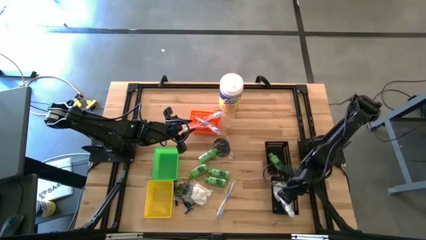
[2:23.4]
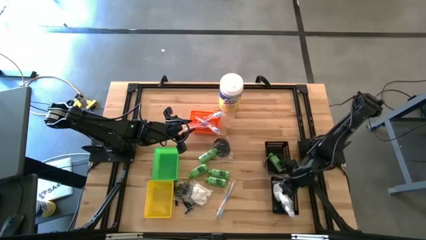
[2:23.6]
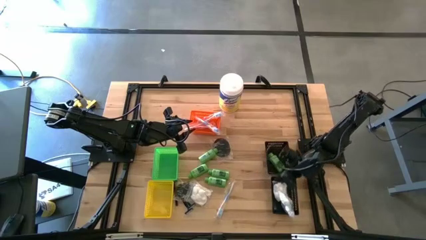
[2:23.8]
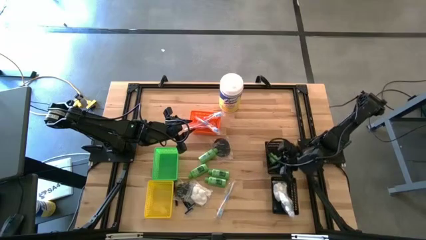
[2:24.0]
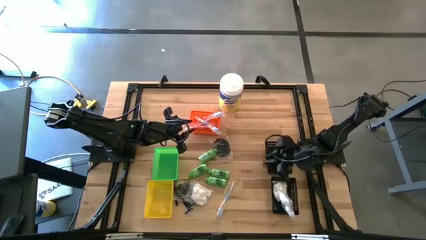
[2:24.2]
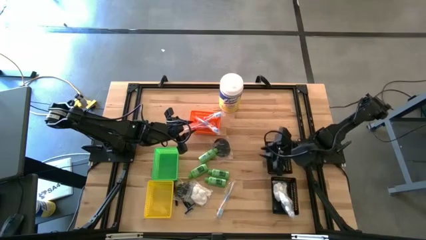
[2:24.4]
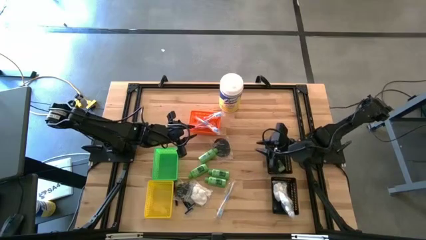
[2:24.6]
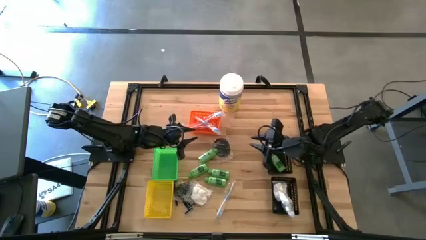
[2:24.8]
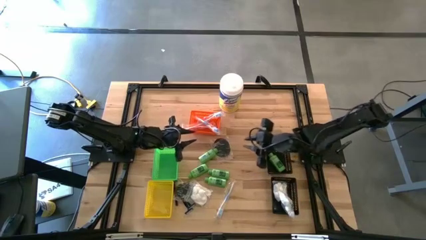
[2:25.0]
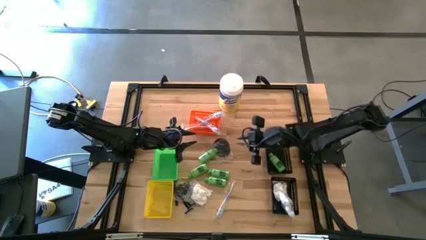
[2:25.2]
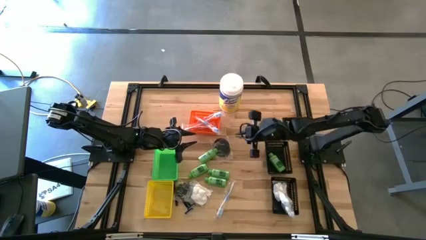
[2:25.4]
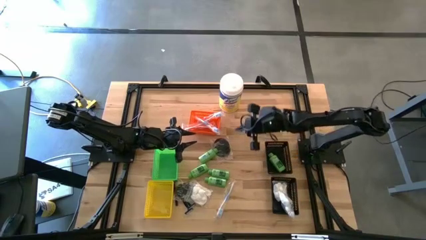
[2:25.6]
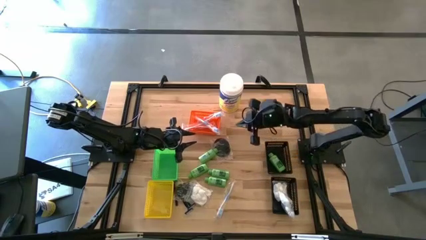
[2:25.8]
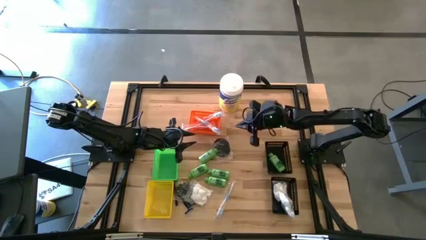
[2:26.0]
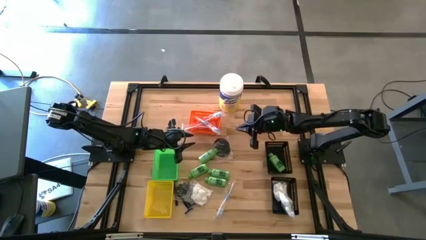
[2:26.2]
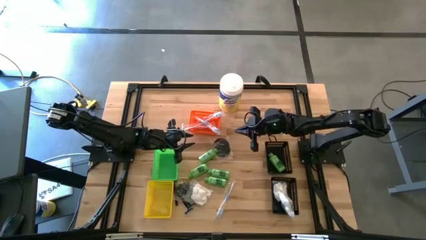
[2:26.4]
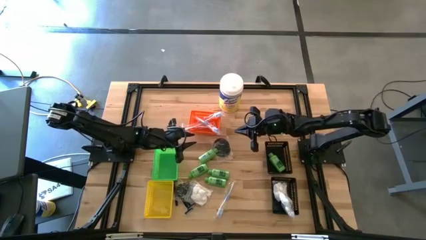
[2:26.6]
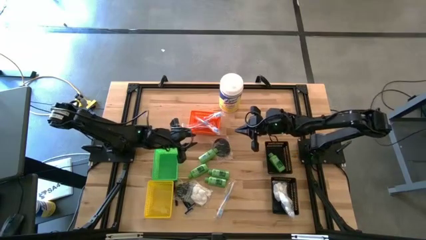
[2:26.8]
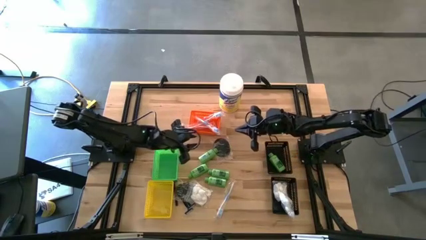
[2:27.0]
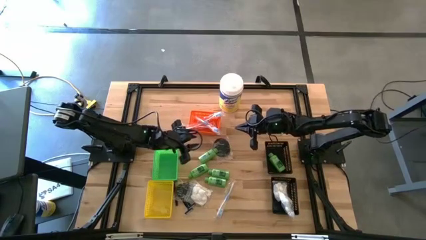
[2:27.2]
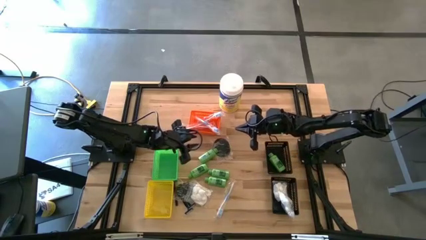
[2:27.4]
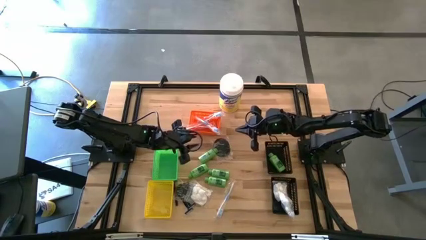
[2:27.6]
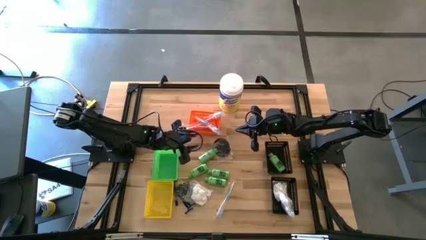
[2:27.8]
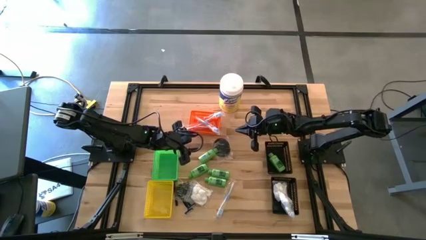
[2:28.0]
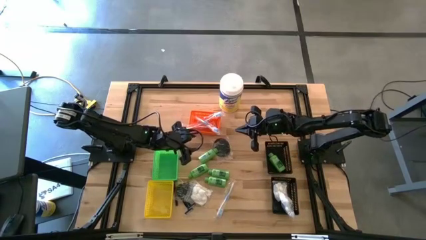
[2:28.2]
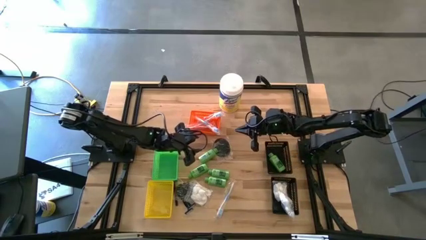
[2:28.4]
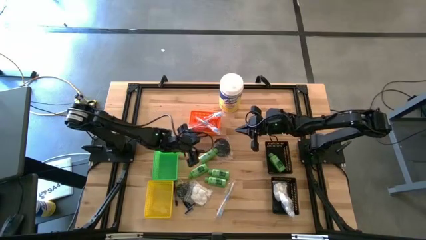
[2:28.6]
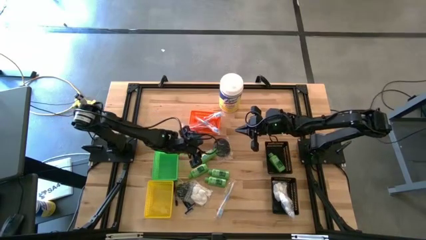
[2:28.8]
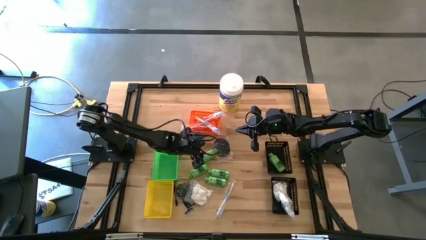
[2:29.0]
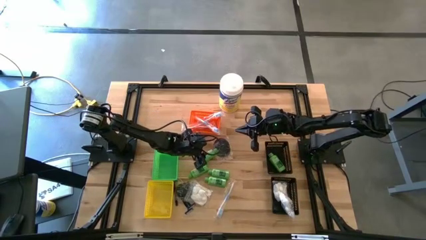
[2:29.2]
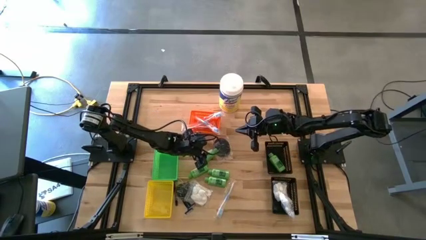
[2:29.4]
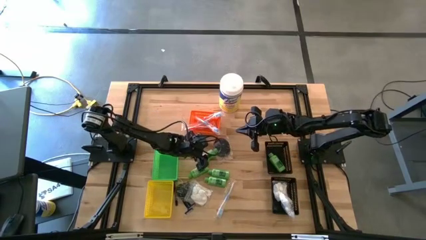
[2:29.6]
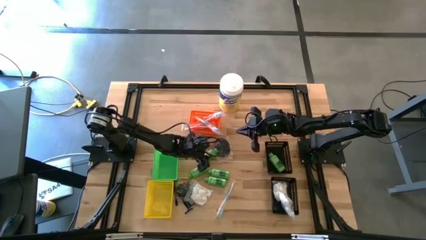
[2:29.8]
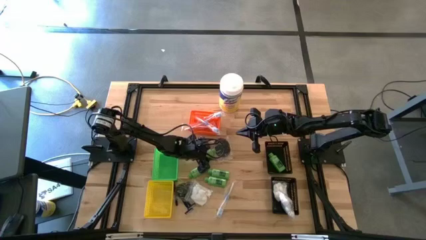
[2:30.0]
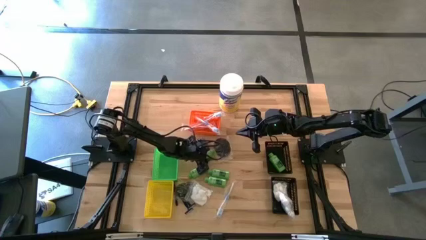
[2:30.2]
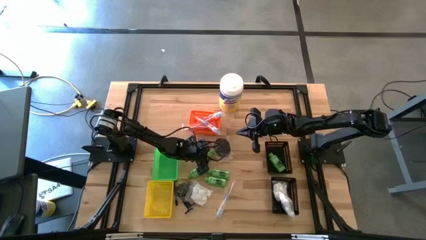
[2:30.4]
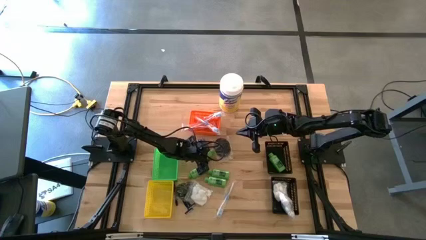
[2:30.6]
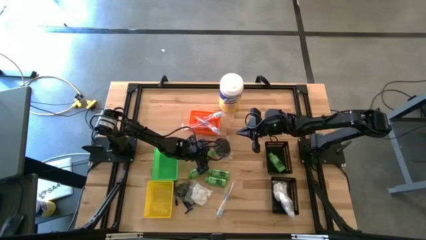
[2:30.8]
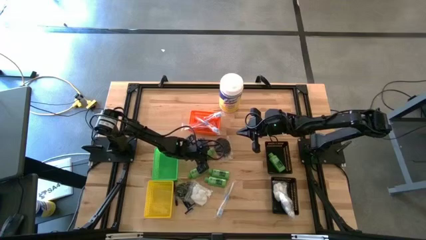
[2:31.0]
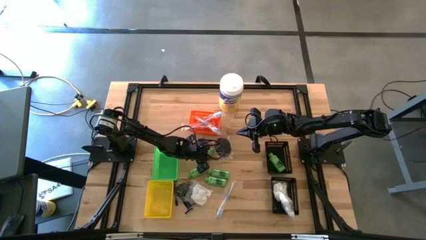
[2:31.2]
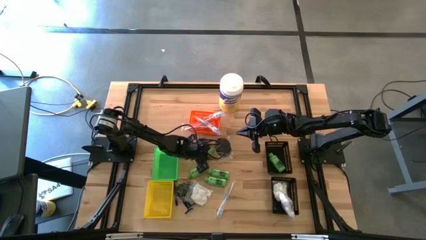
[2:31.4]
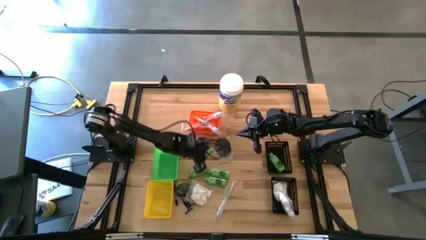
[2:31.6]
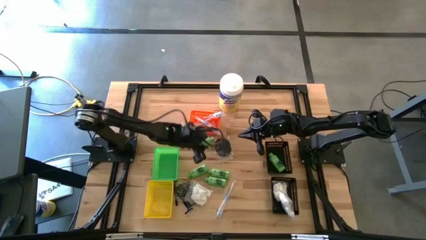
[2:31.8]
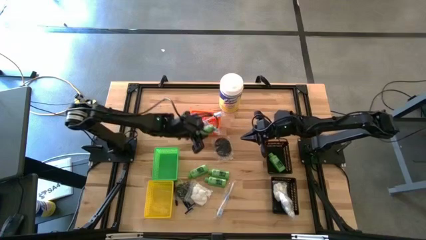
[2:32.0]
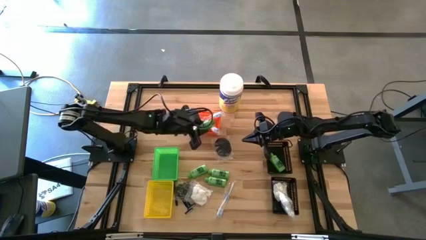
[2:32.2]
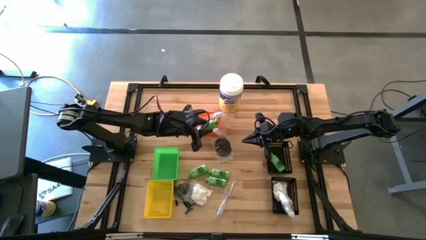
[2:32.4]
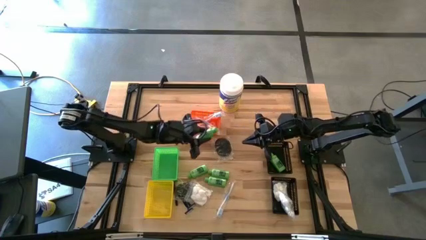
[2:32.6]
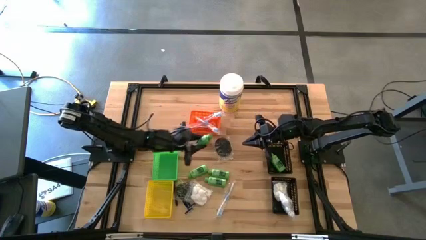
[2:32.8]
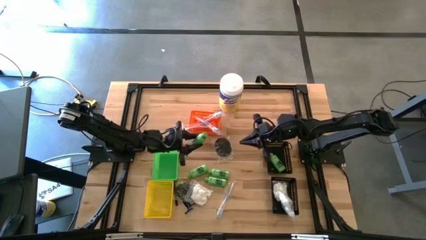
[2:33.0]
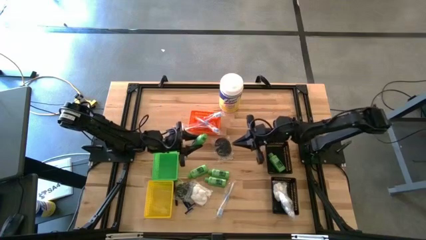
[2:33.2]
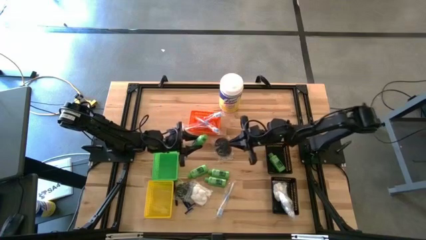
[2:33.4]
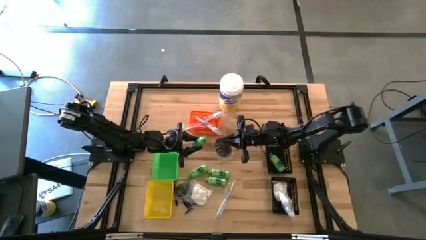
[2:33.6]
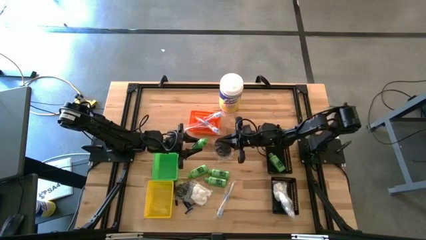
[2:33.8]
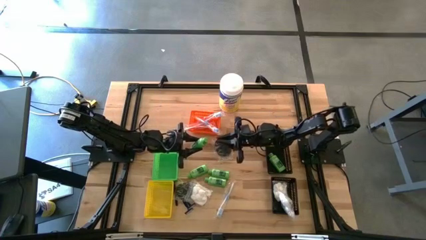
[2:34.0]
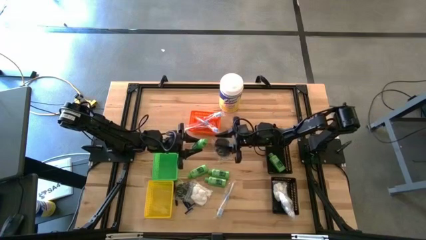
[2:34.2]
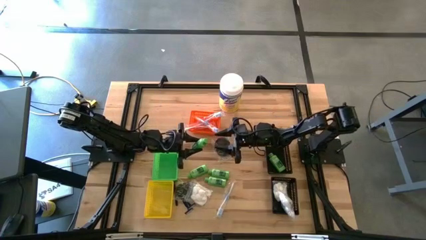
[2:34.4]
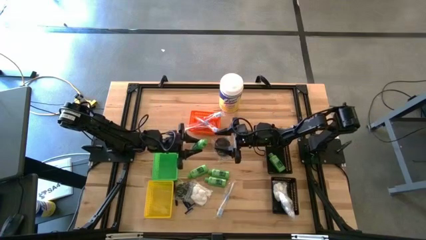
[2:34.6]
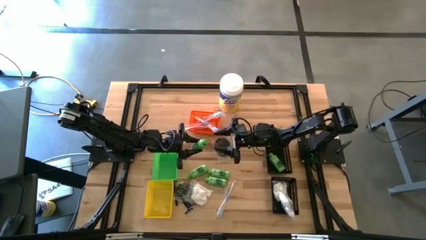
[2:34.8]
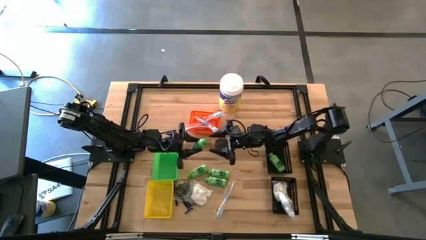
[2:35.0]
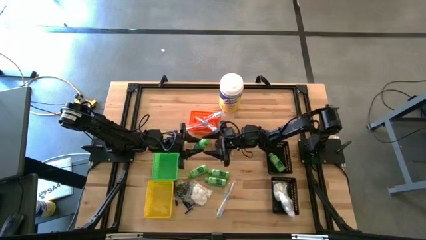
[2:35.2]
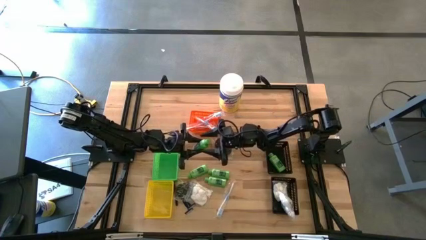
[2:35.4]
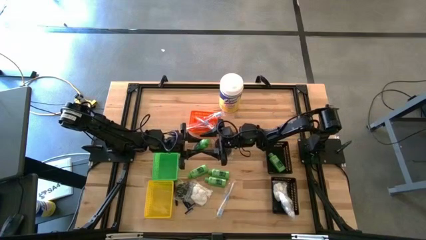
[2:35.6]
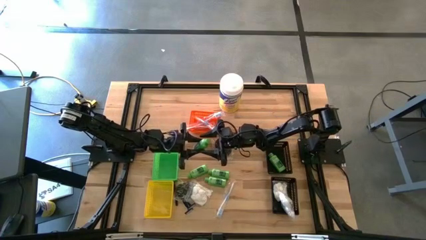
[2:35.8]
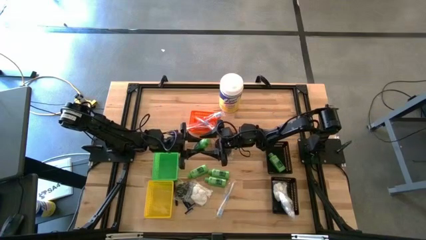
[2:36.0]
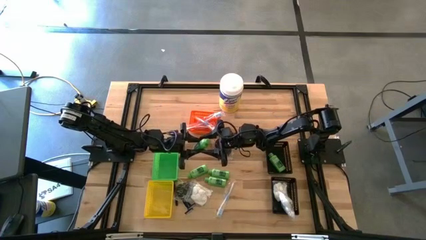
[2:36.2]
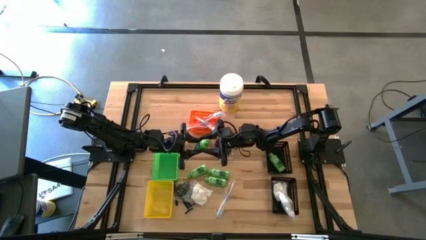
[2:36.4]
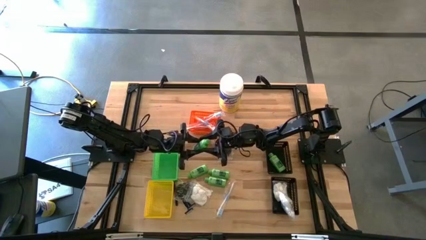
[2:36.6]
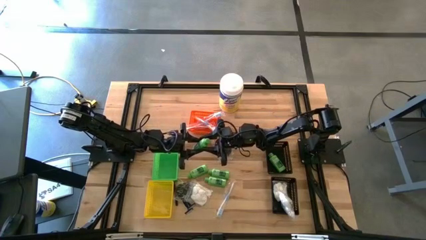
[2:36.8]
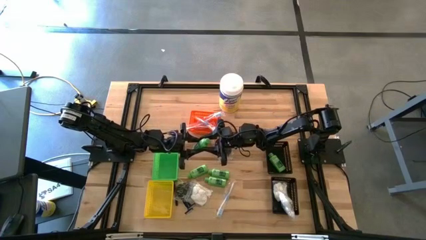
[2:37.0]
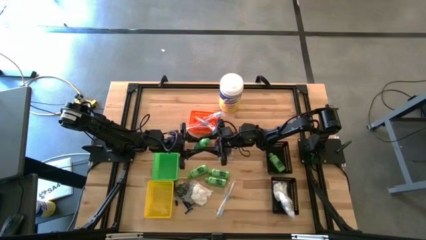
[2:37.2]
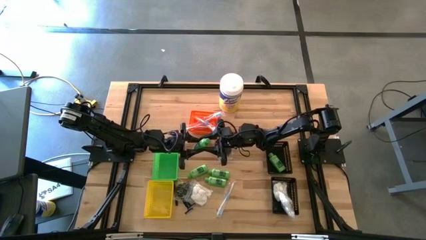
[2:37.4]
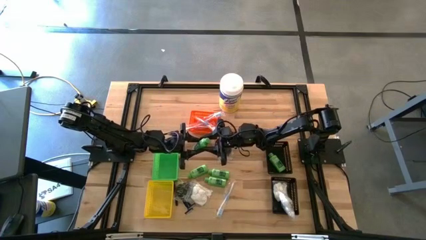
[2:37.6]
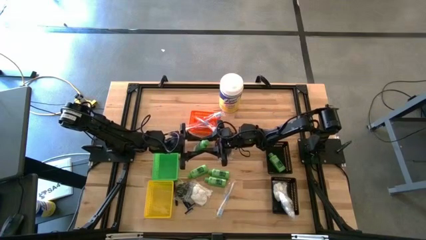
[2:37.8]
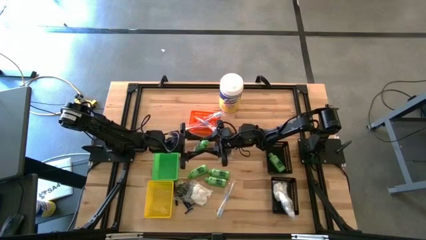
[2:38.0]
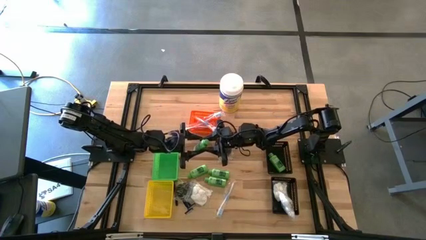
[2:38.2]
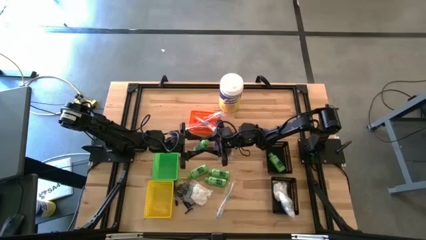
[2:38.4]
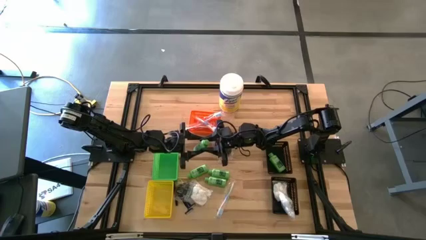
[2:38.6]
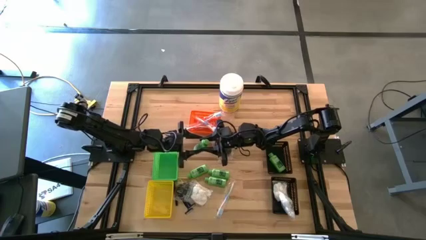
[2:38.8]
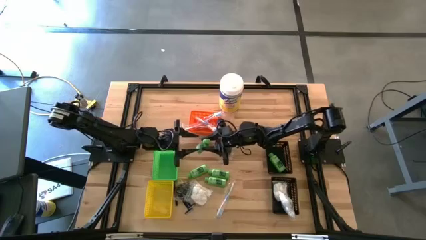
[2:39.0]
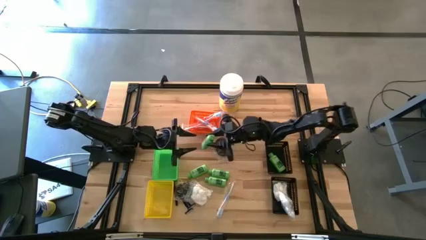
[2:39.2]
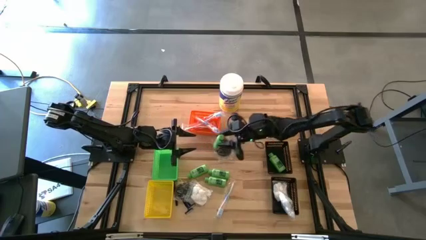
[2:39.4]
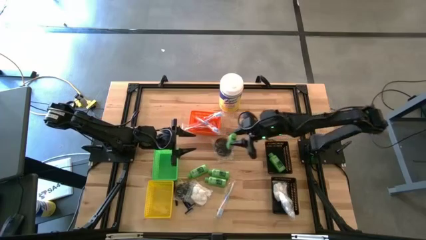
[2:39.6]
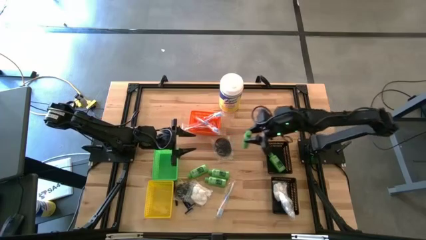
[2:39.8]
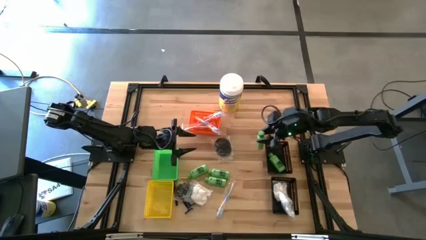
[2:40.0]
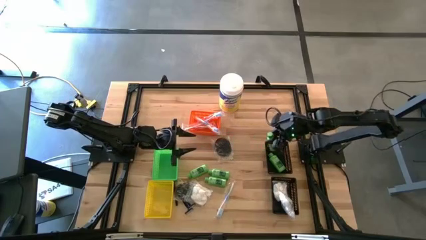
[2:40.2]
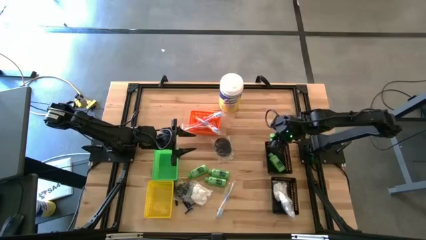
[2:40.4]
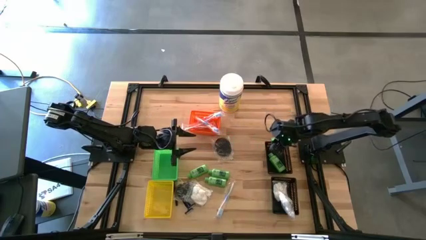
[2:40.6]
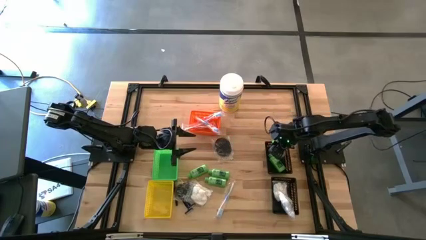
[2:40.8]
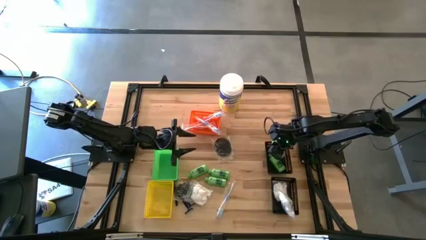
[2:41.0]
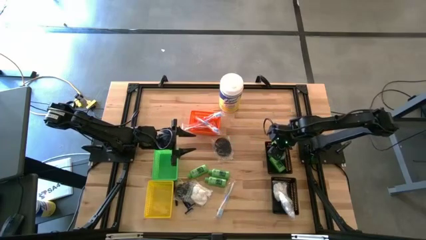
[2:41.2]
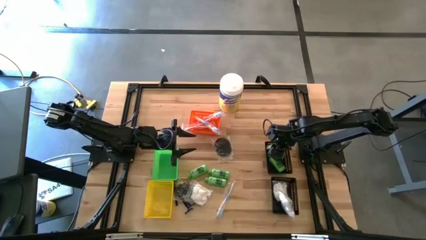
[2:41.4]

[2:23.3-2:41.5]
Task: Pick & Place Travel size toiletries
Put the green shampoo into the top black bin
